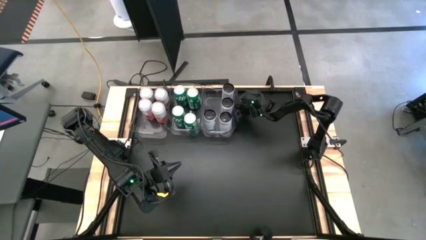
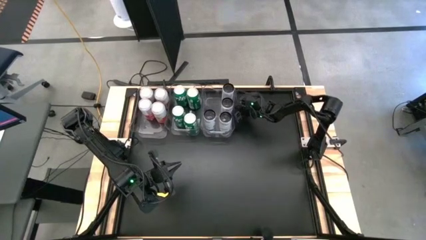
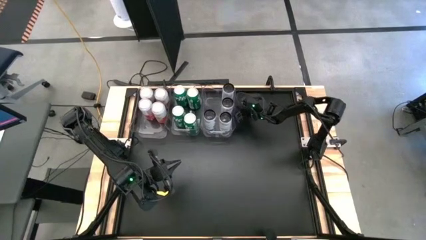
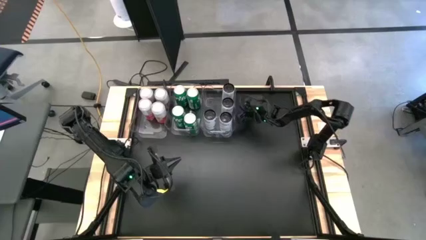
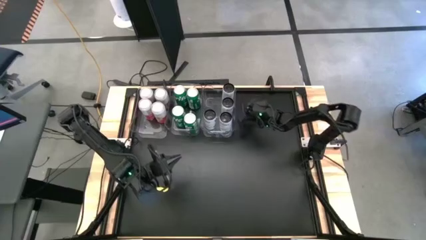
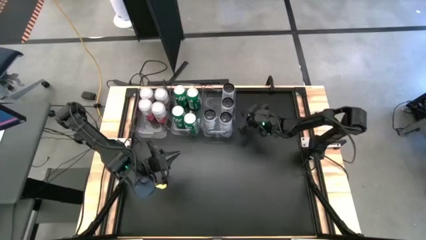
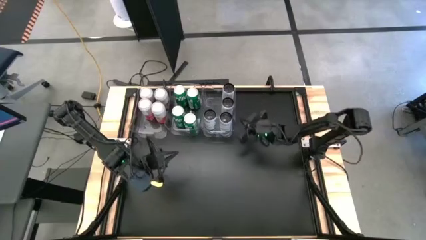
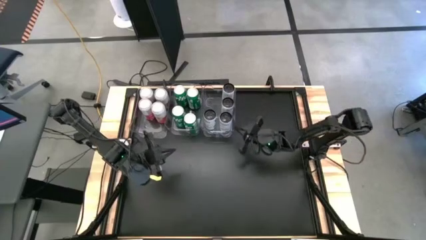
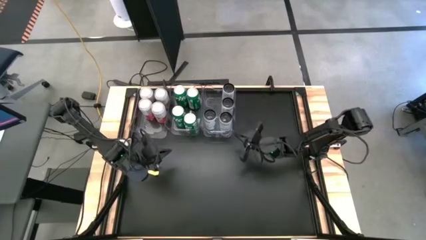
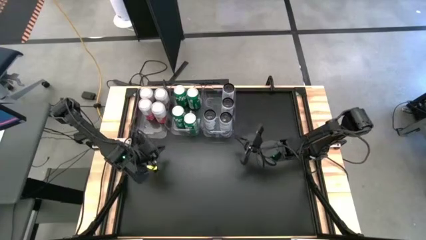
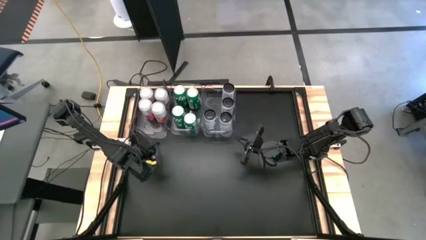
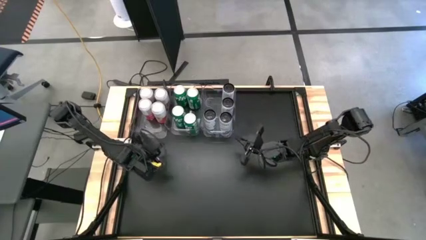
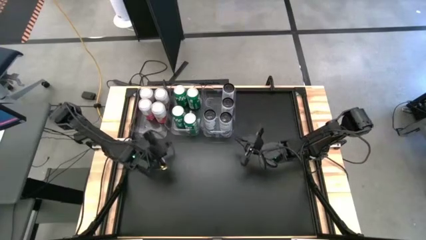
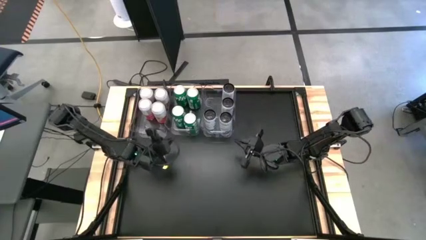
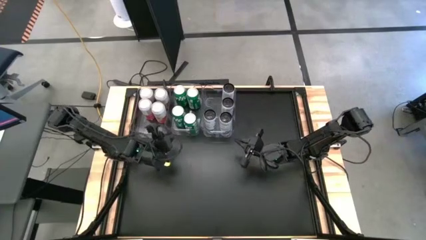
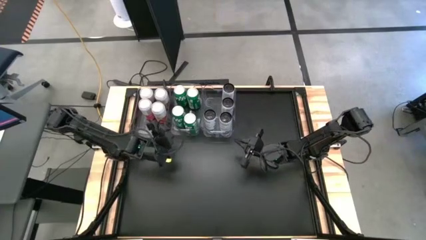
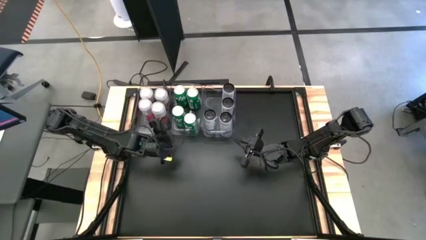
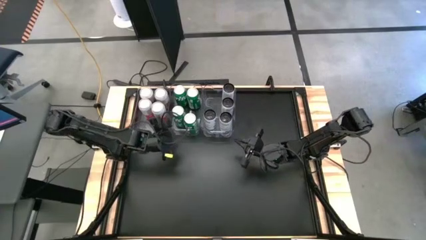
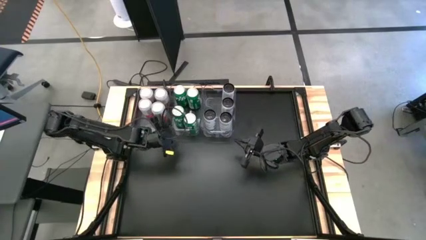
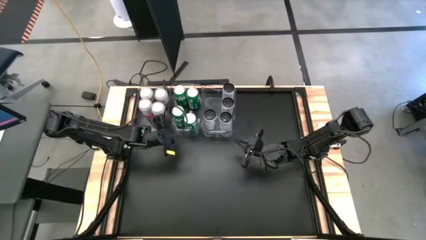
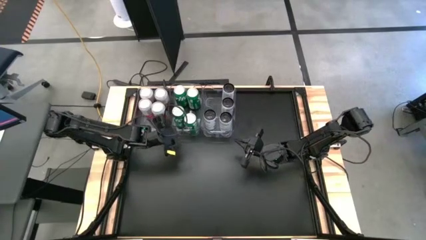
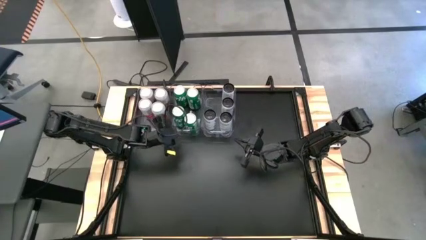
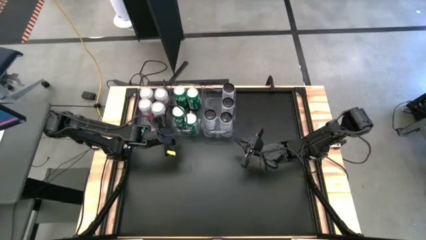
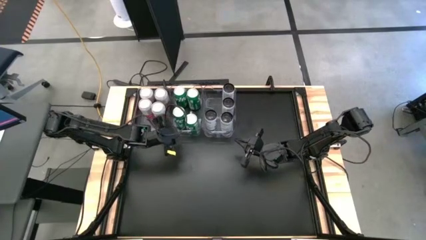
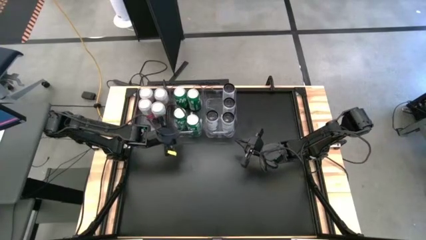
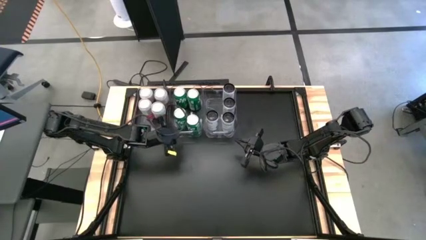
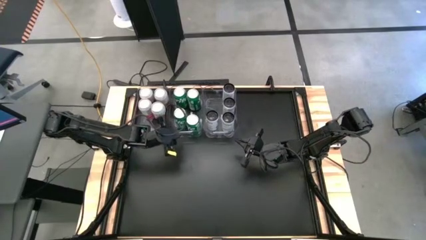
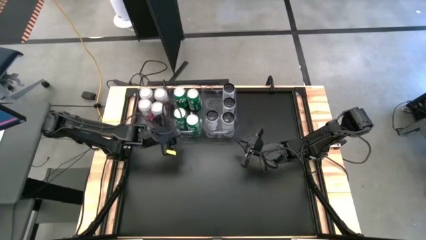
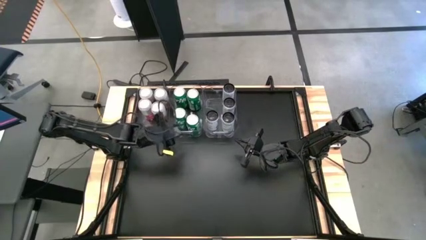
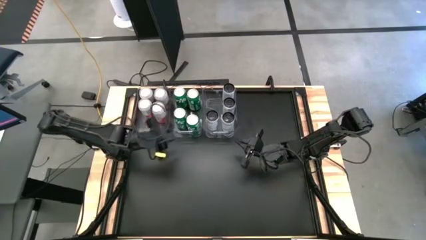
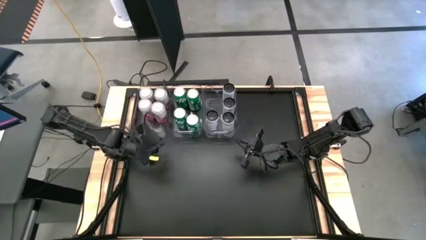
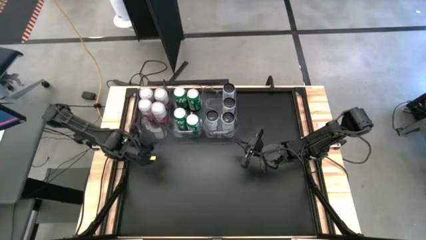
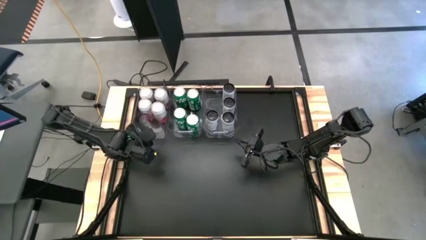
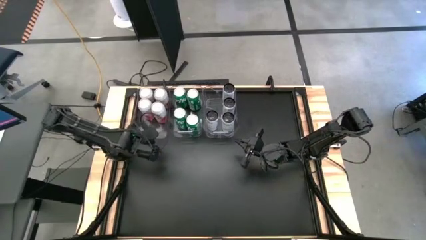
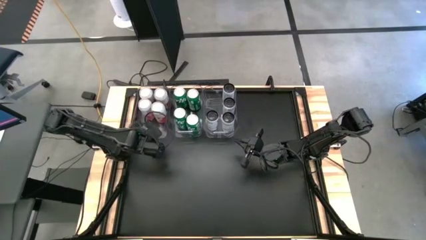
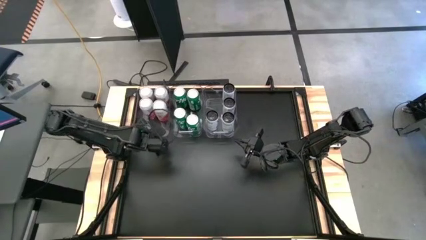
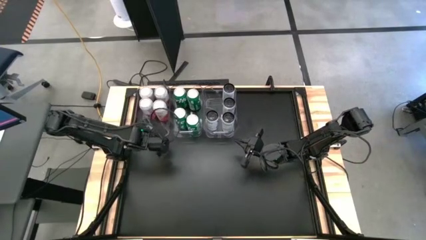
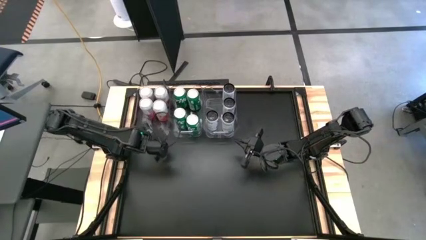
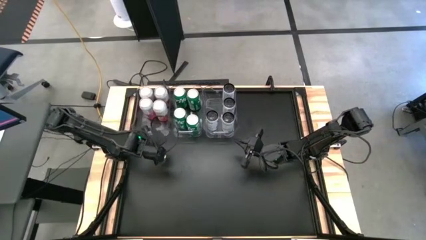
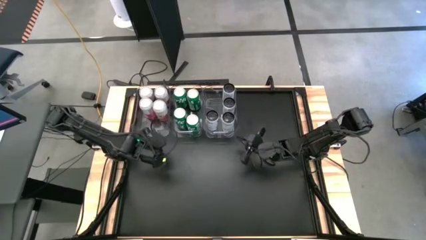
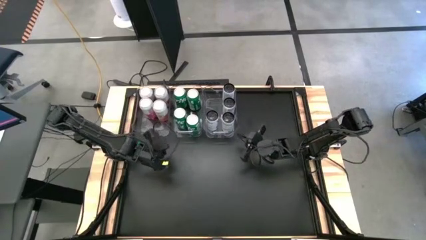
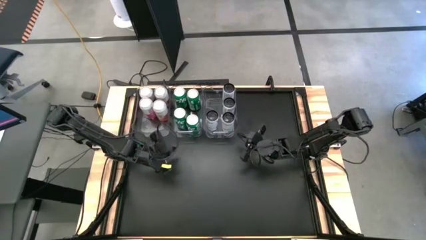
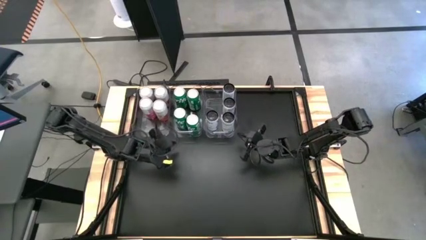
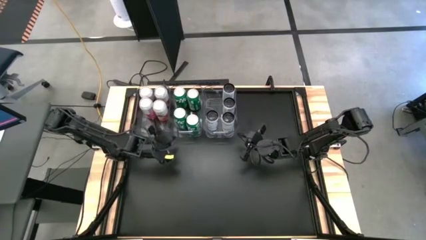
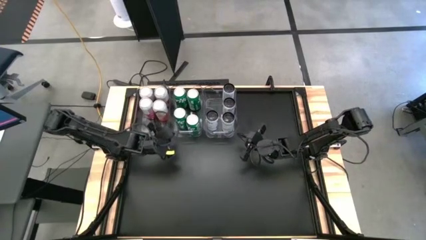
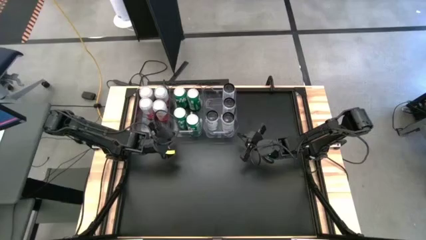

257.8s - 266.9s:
Task: Sort soda cans
Adjust the transparent bins

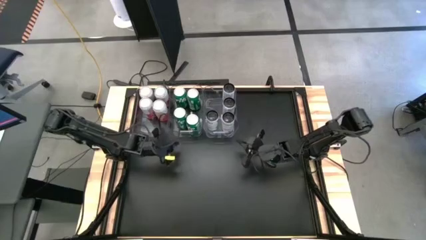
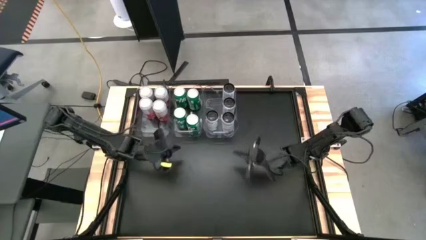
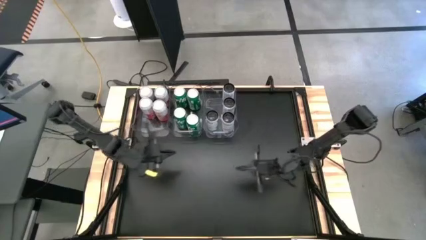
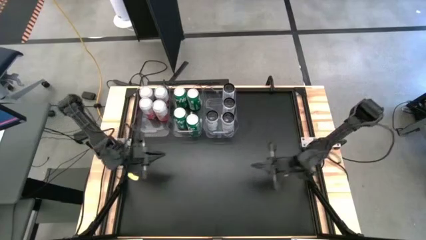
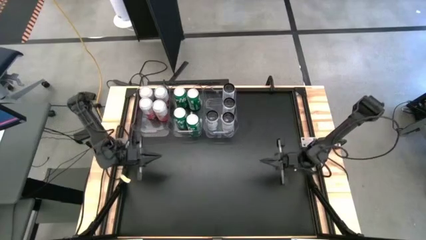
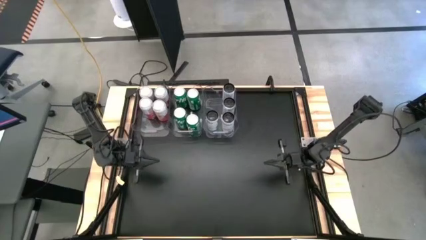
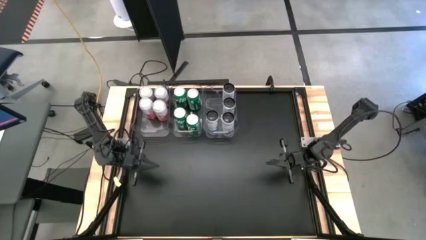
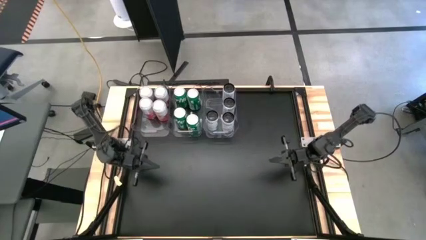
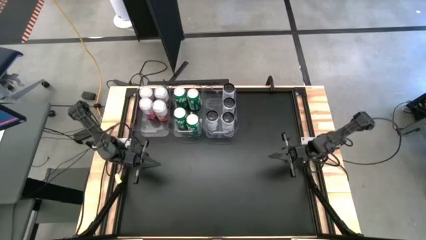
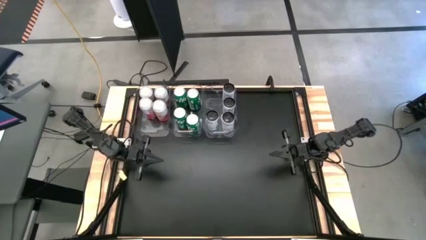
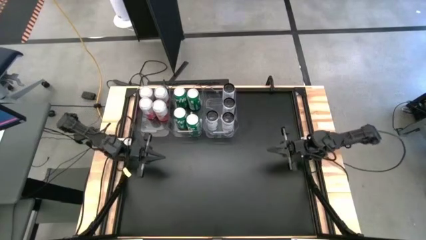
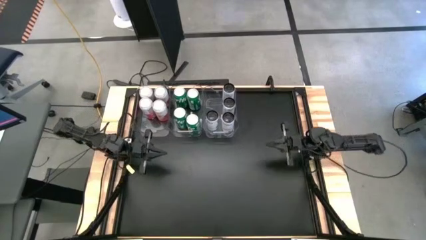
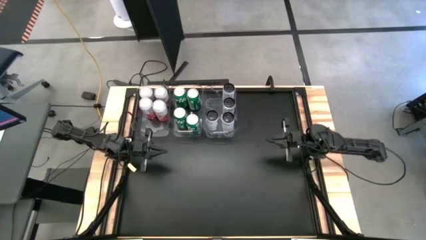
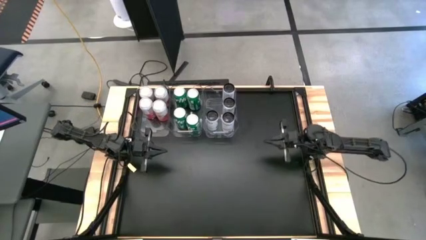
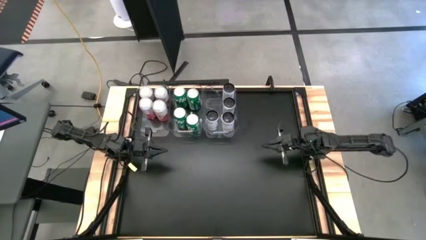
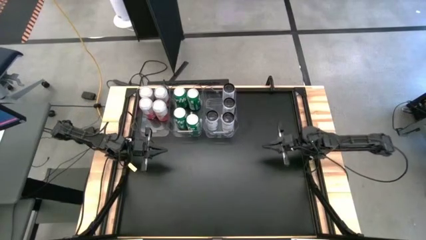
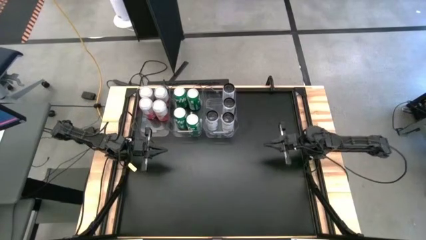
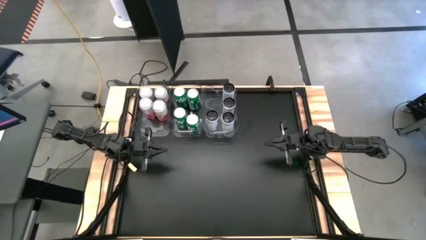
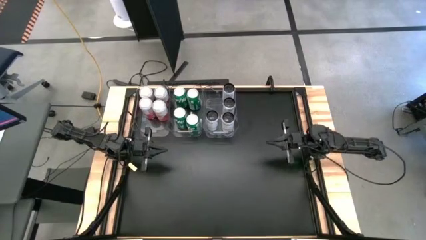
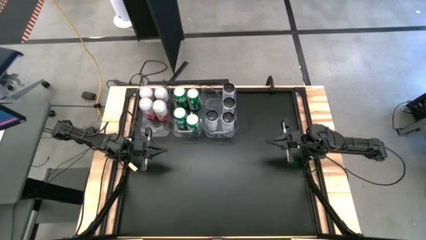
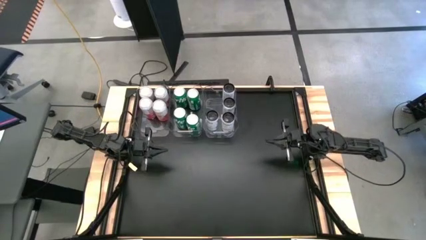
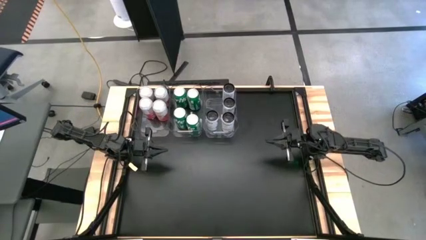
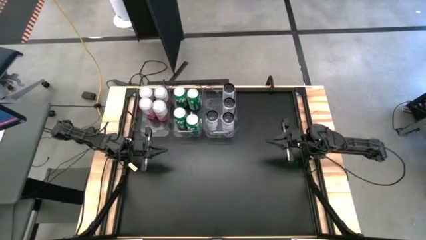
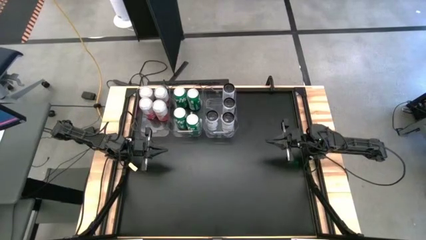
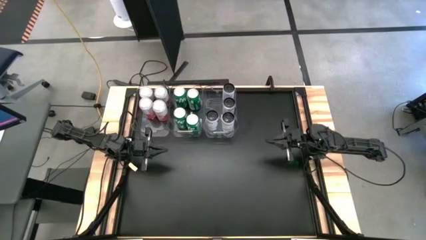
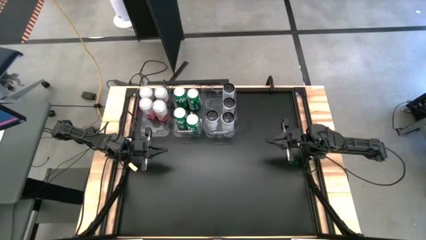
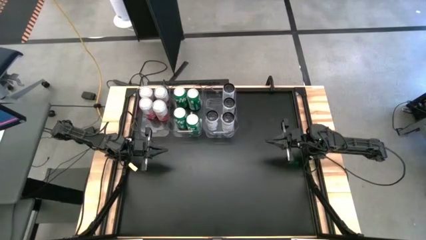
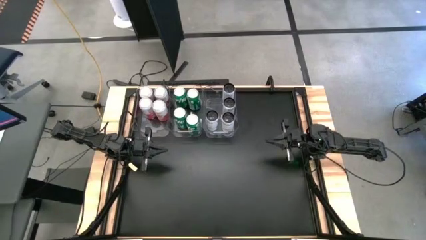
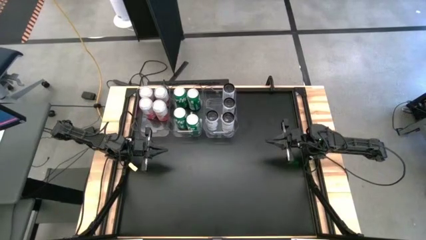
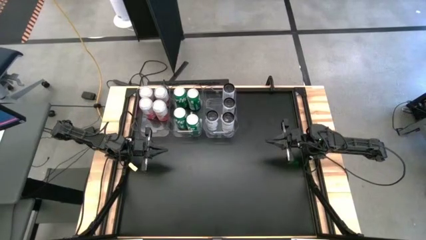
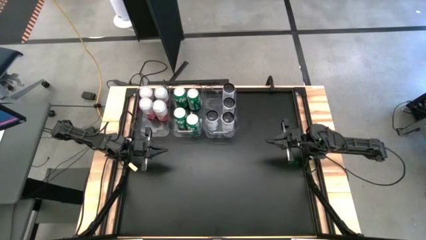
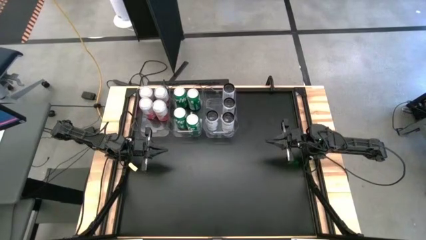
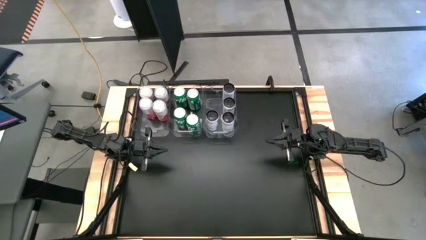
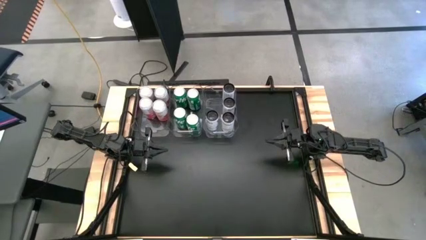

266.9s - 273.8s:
Return to Home Position
